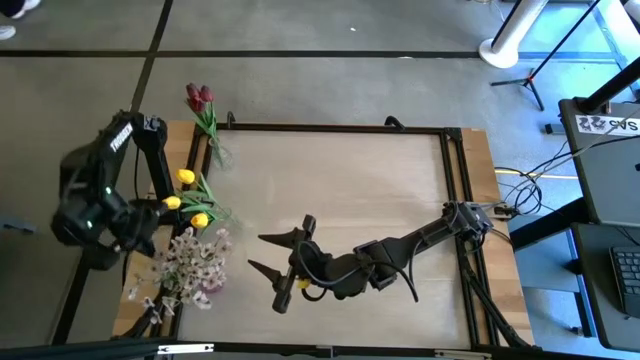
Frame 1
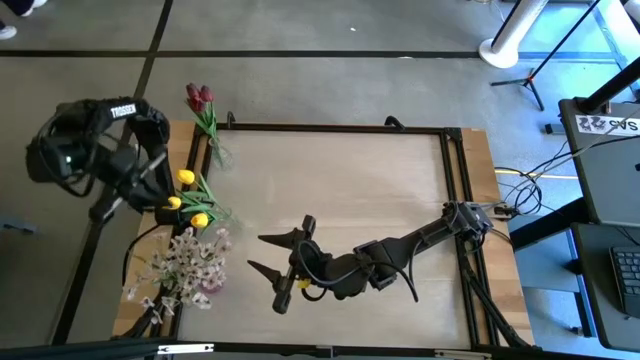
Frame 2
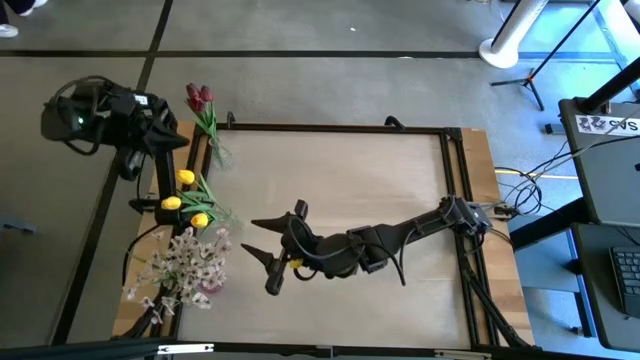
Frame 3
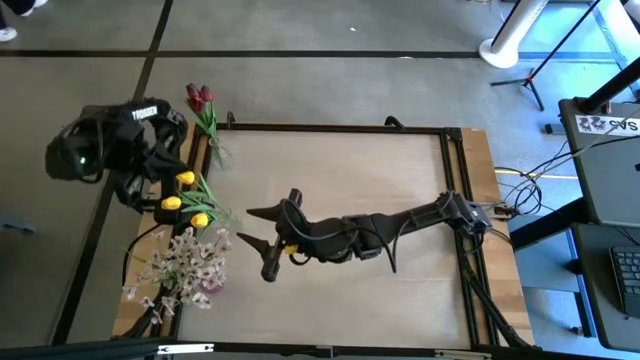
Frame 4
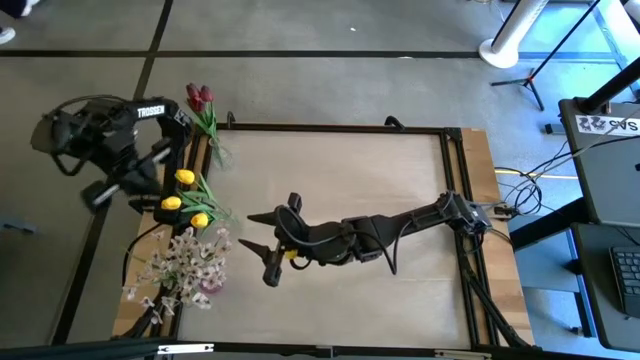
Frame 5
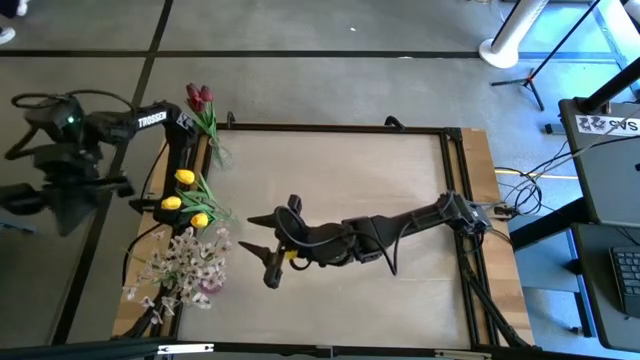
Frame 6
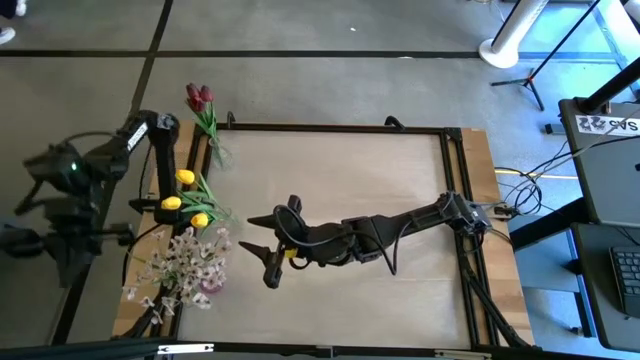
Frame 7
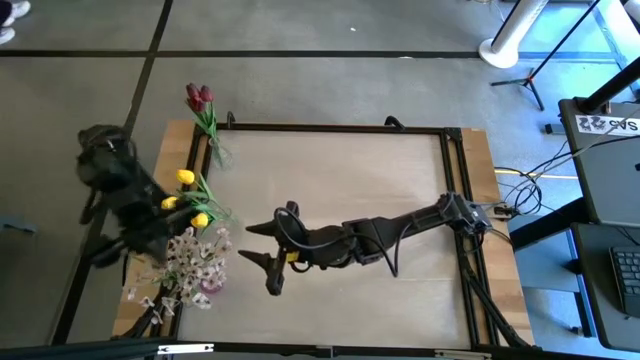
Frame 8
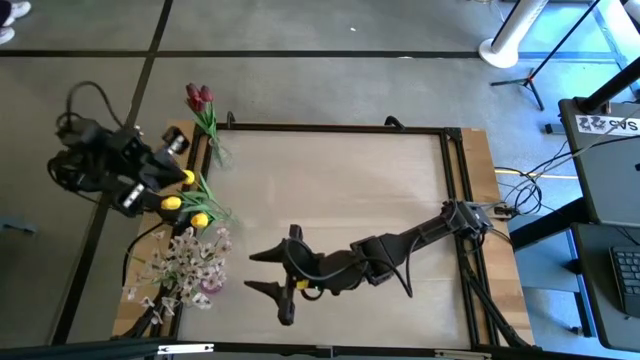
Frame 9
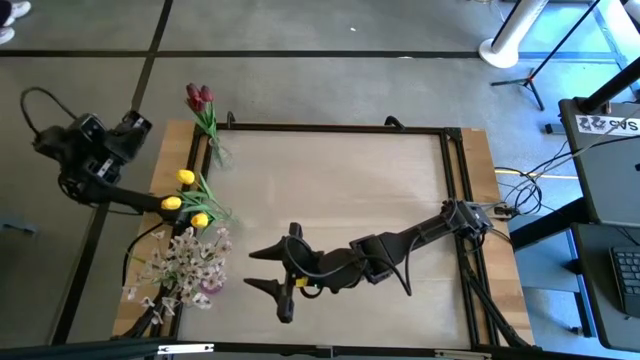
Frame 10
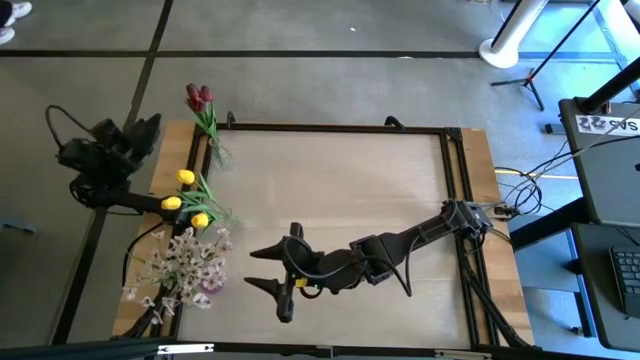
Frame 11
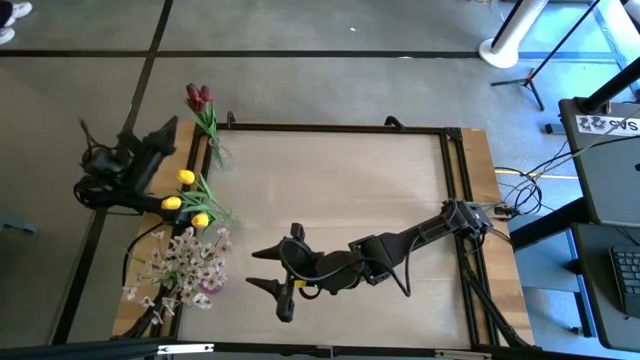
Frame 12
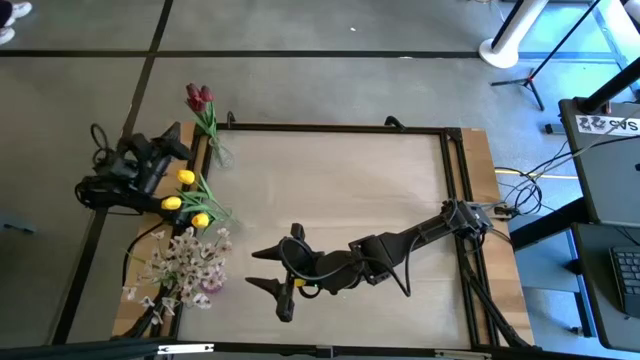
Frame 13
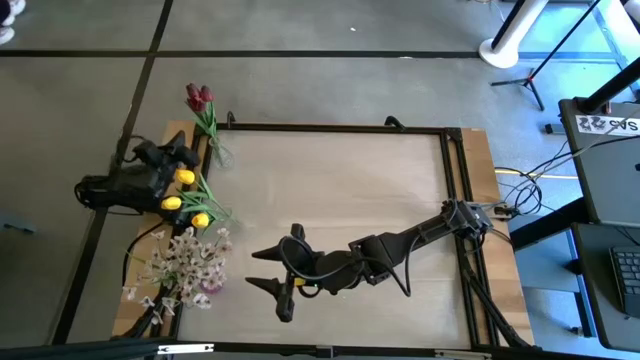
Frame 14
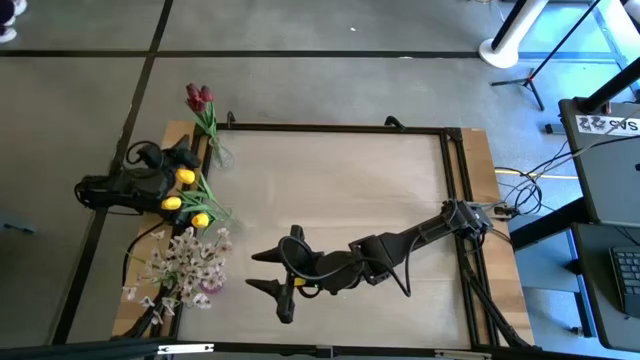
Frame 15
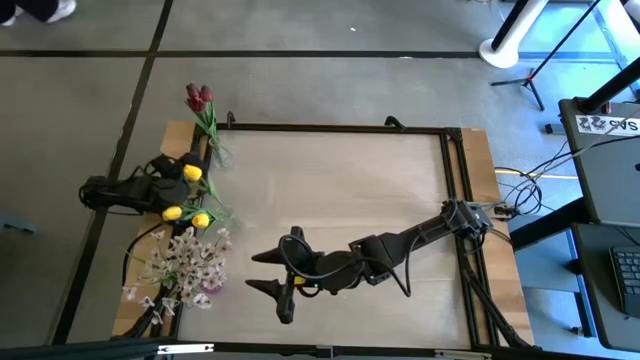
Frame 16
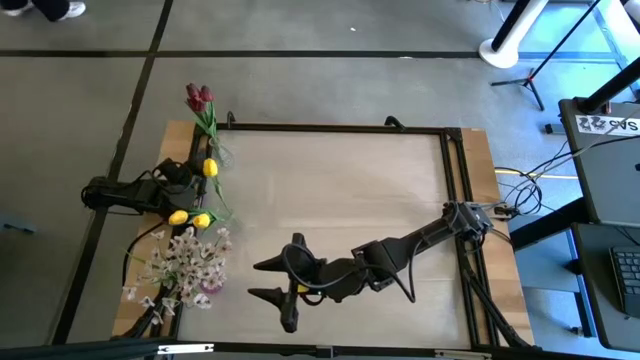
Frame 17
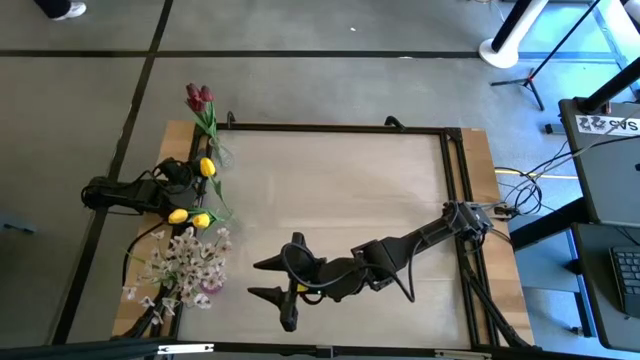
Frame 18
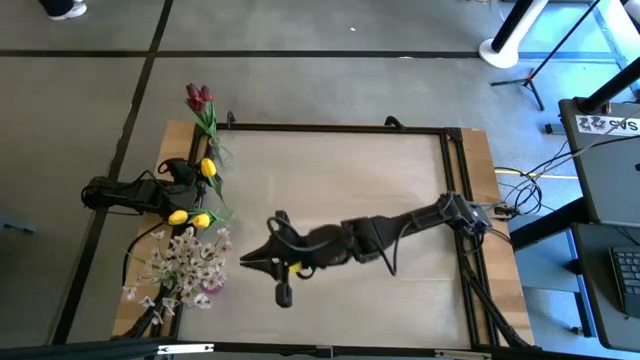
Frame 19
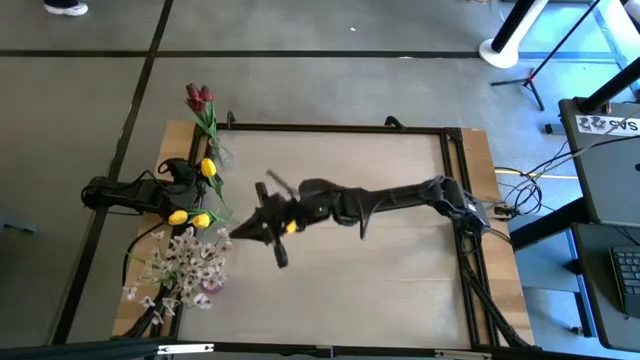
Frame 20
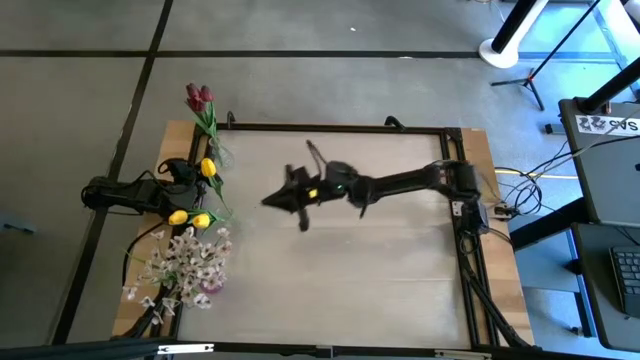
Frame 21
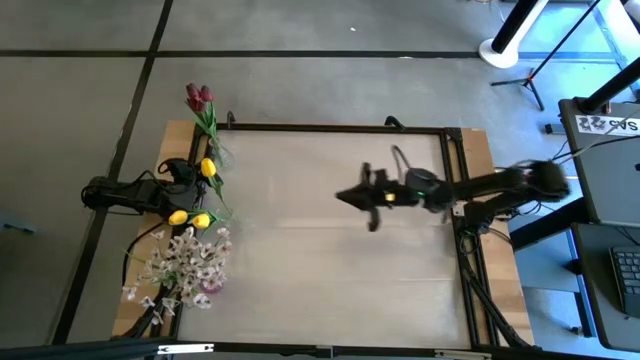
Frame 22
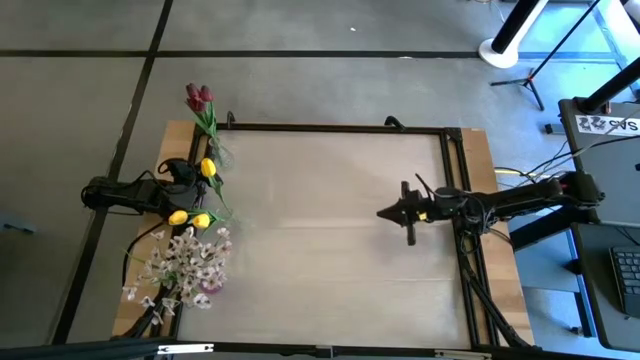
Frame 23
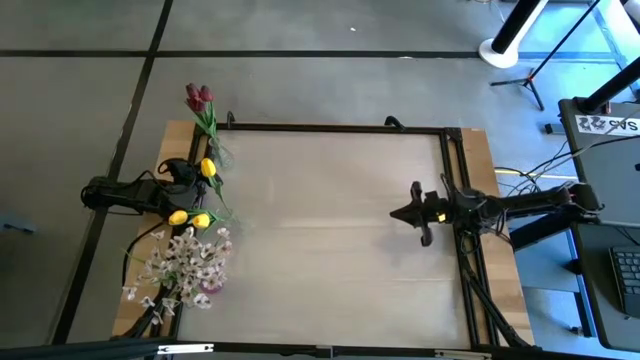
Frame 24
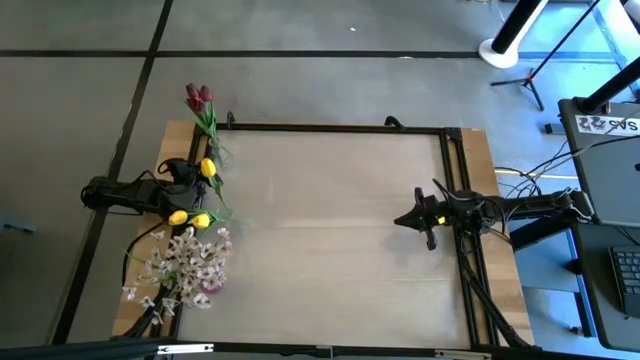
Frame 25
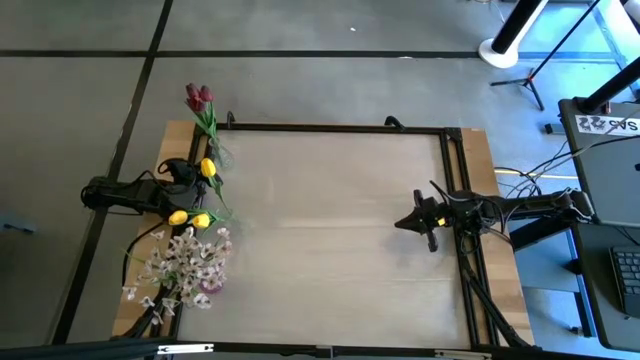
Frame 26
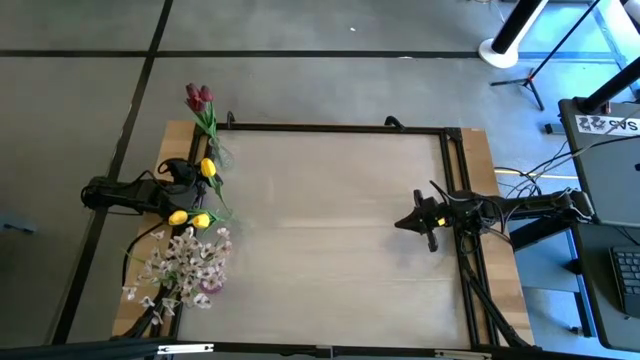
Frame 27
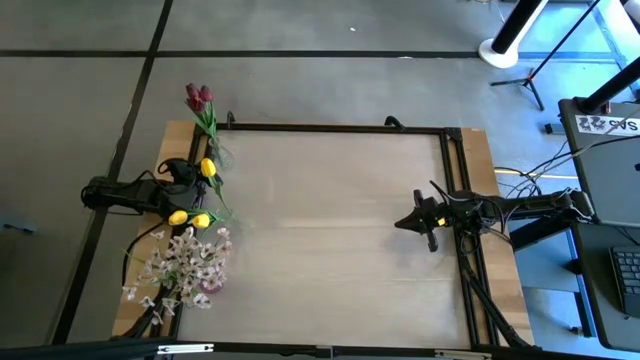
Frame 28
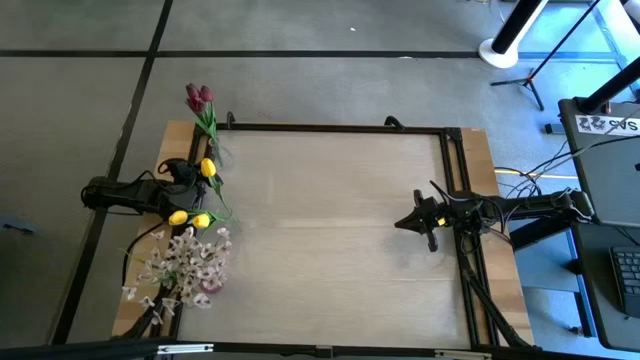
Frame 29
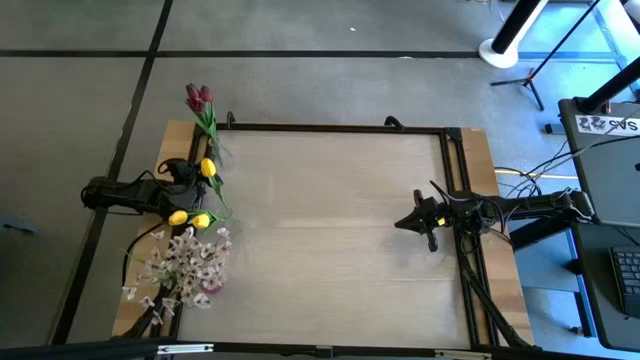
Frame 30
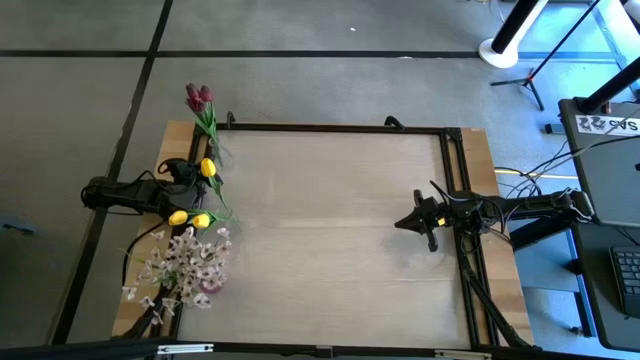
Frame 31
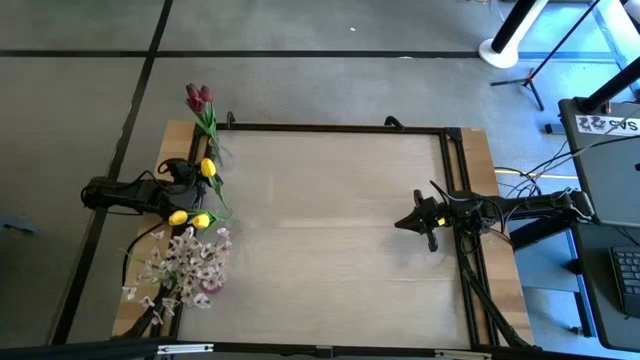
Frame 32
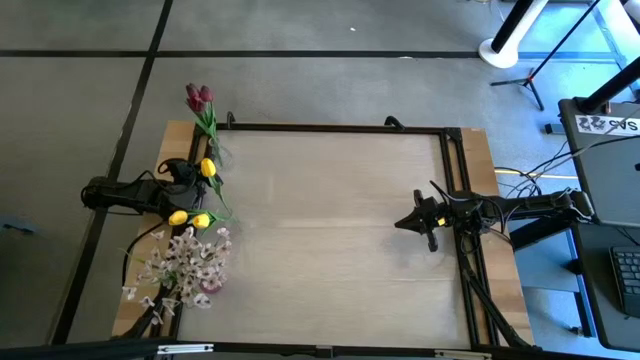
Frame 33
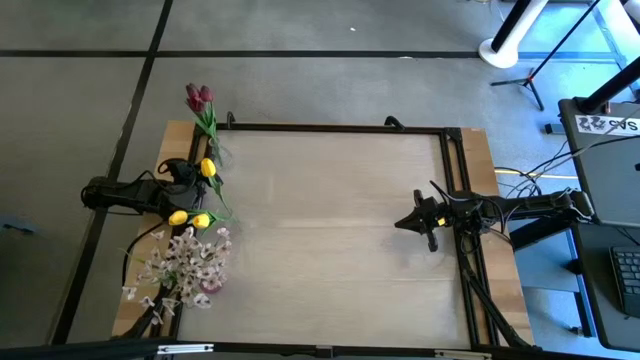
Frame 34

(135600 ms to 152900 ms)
Task: Sort flowers into vase by color
Return to Home Position

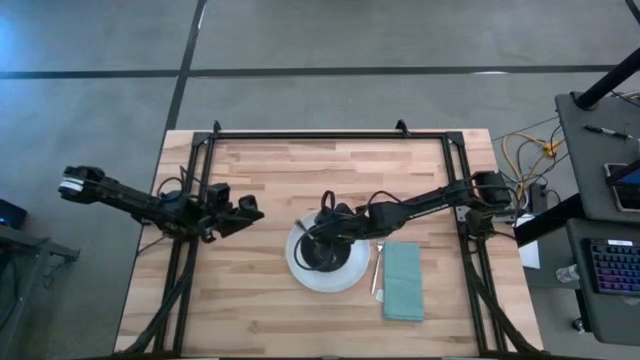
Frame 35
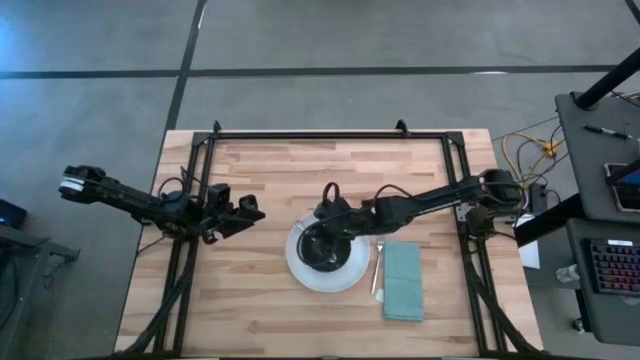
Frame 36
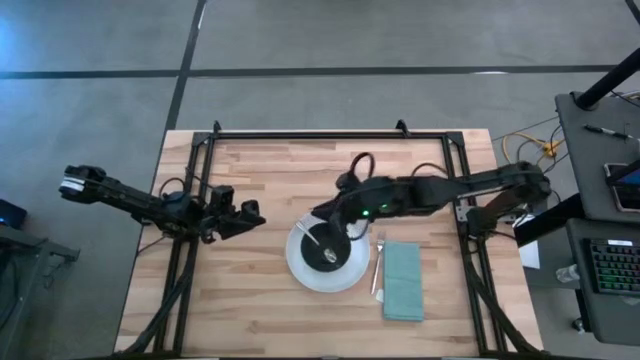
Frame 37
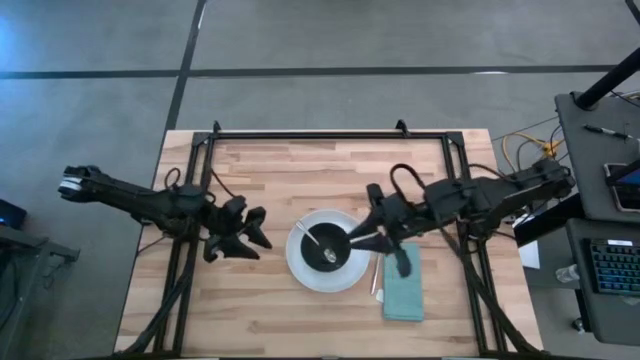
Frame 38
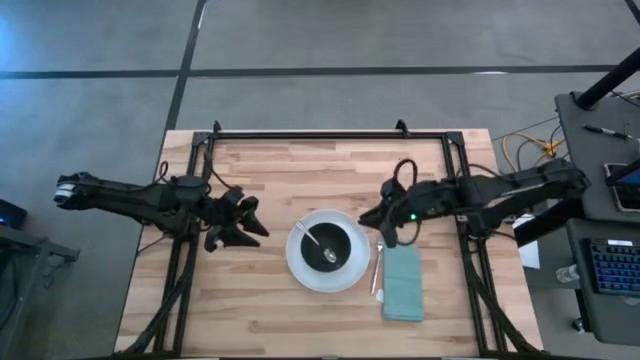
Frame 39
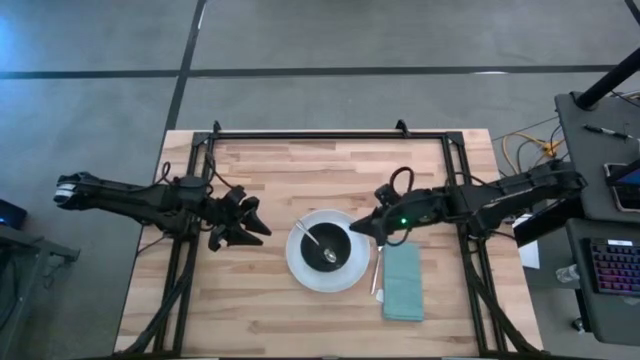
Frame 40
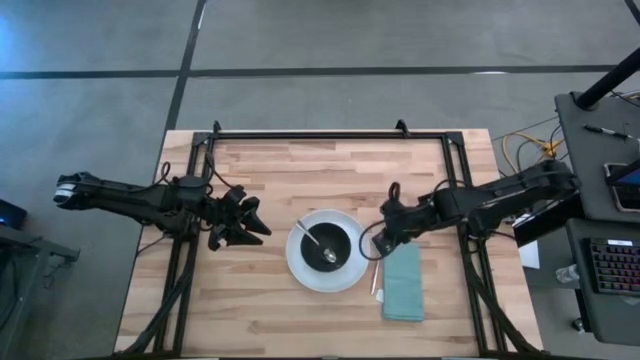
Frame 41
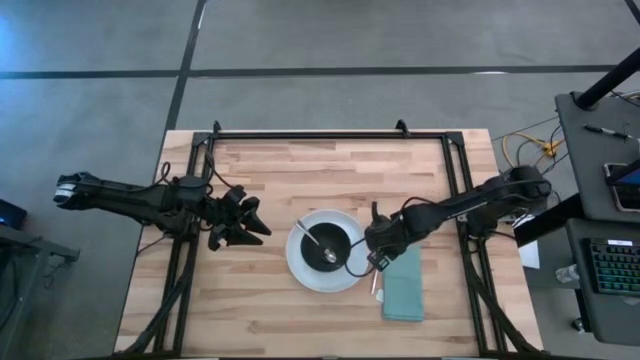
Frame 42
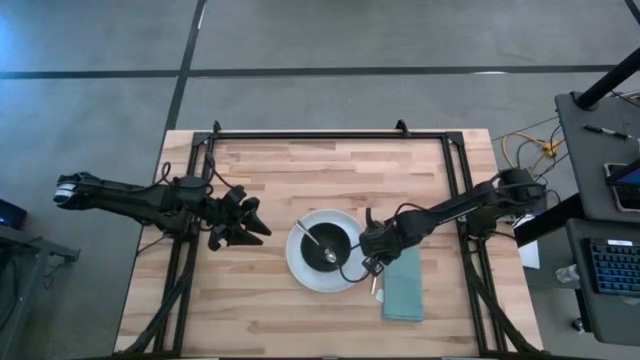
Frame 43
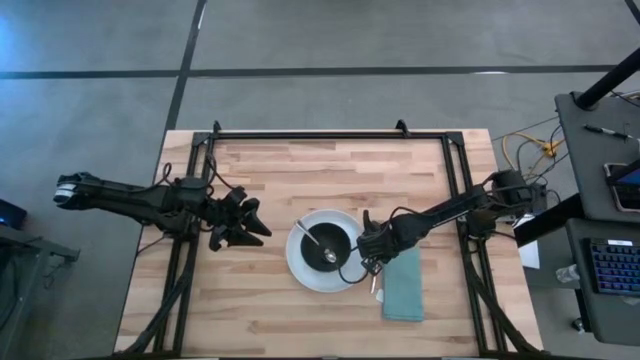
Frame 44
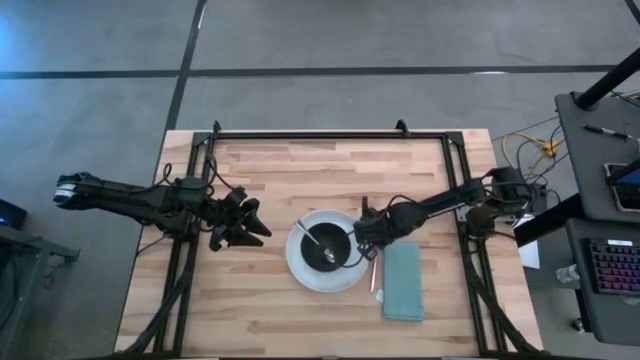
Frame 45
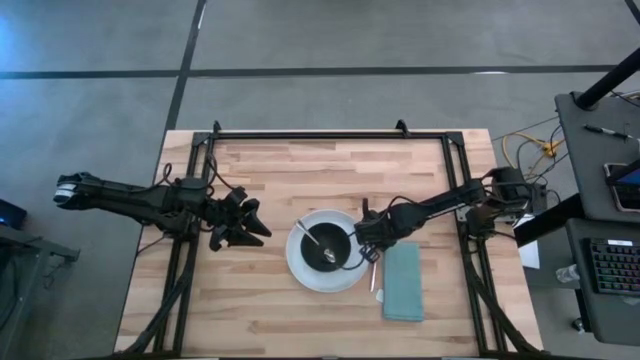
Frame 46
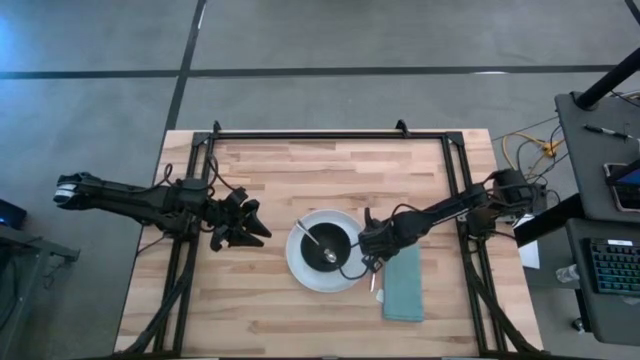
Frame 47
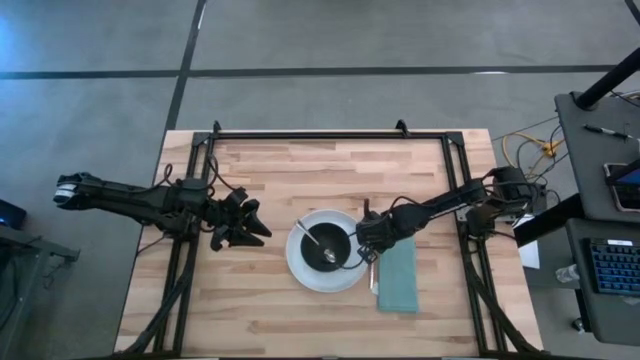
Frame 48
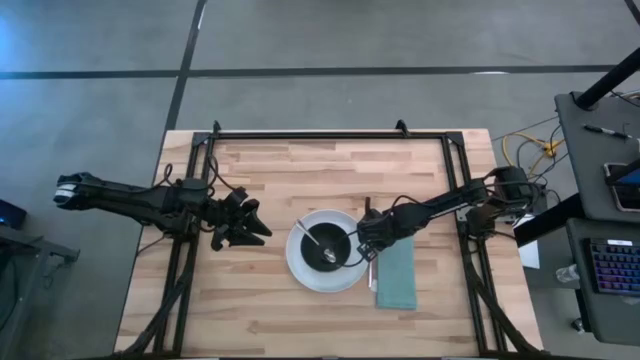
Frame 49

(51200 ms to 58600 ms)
Task: Set table place
Adjust the silver fork
